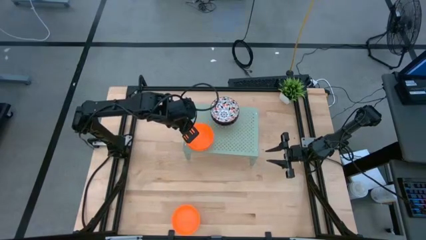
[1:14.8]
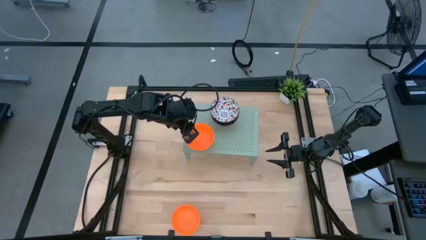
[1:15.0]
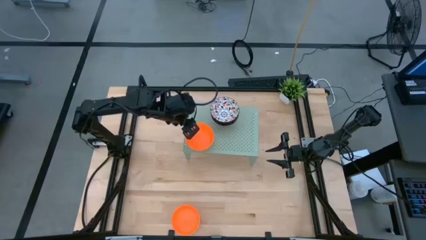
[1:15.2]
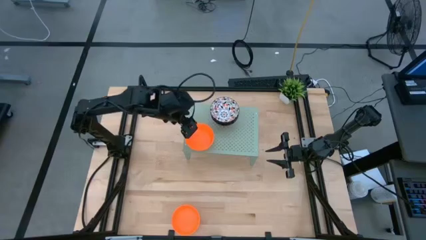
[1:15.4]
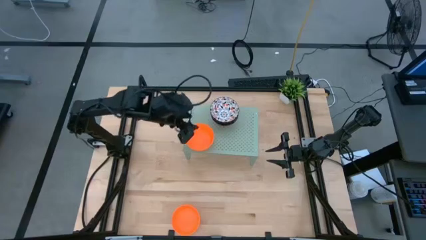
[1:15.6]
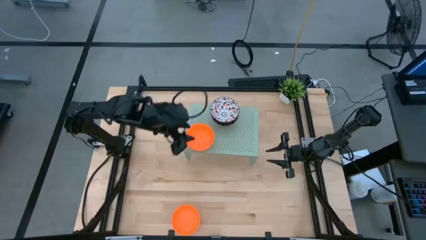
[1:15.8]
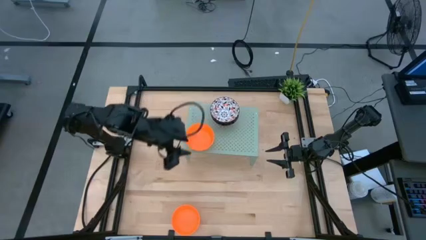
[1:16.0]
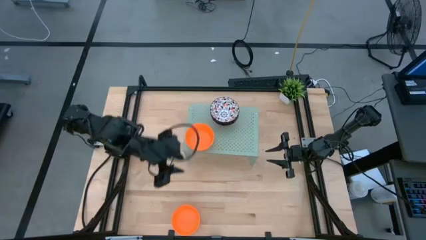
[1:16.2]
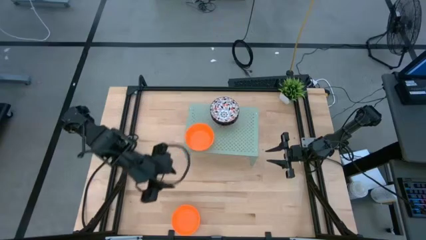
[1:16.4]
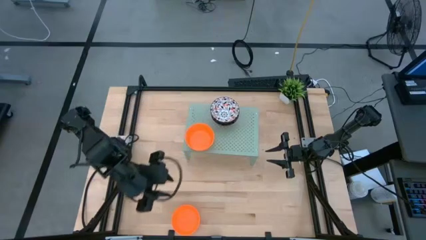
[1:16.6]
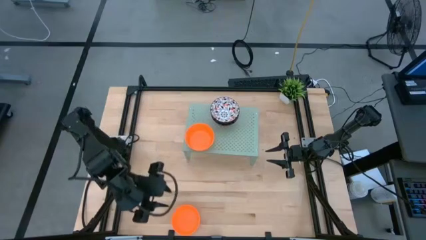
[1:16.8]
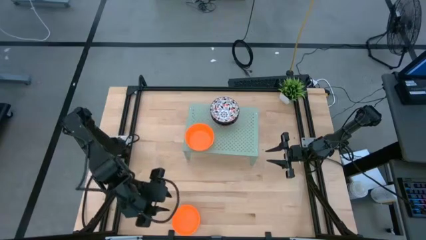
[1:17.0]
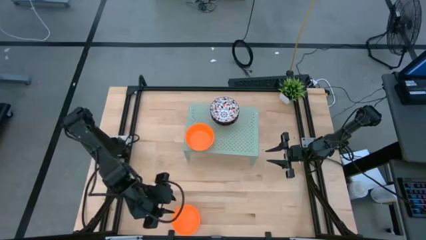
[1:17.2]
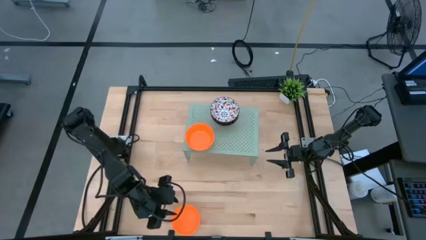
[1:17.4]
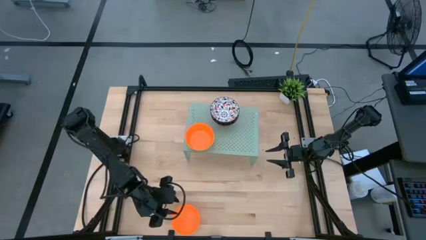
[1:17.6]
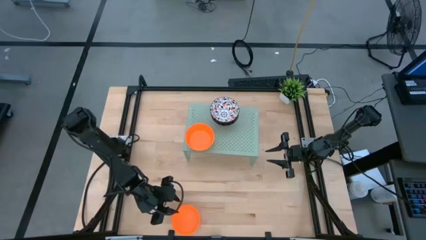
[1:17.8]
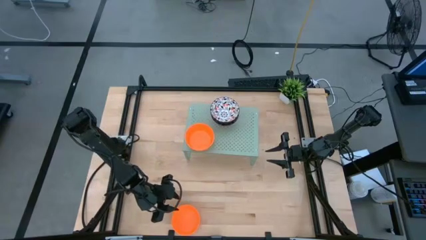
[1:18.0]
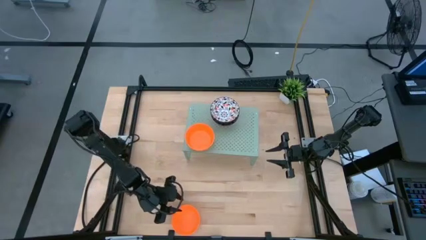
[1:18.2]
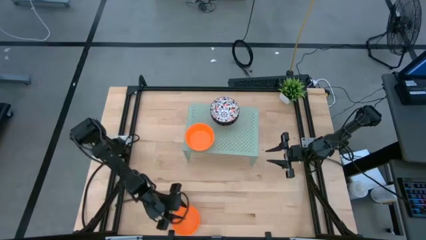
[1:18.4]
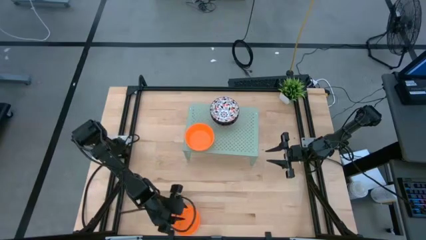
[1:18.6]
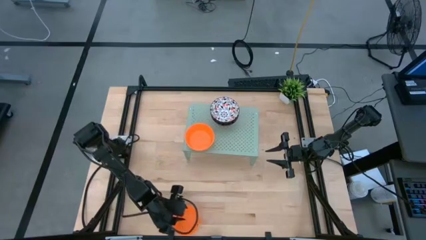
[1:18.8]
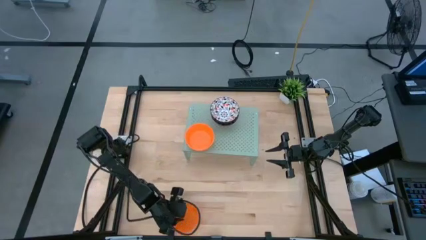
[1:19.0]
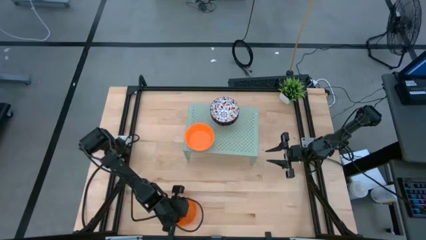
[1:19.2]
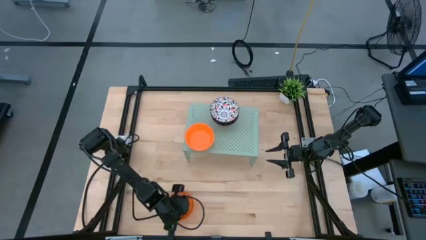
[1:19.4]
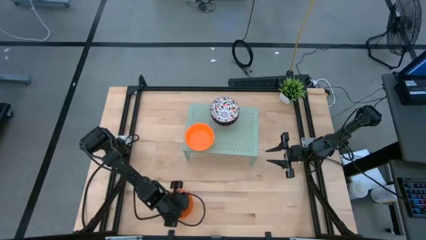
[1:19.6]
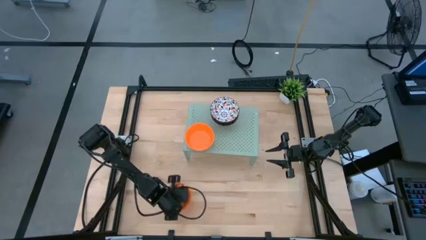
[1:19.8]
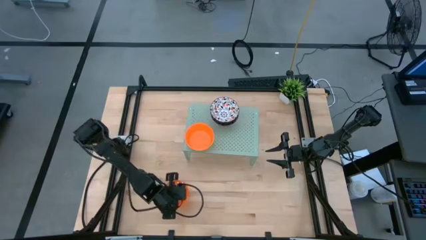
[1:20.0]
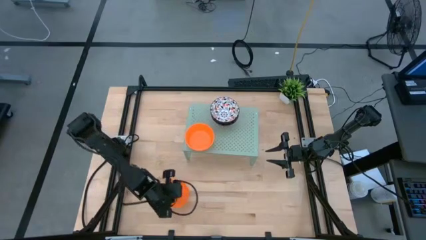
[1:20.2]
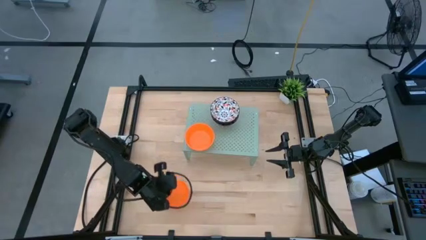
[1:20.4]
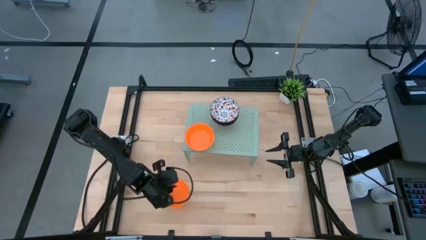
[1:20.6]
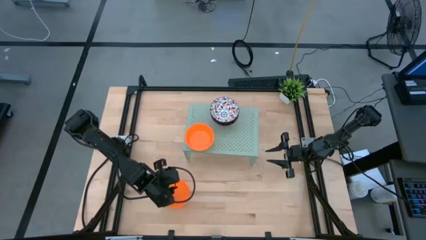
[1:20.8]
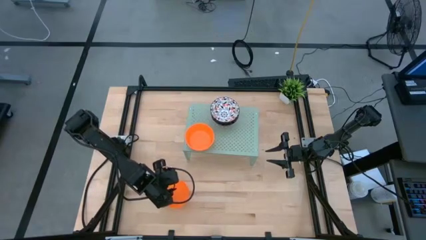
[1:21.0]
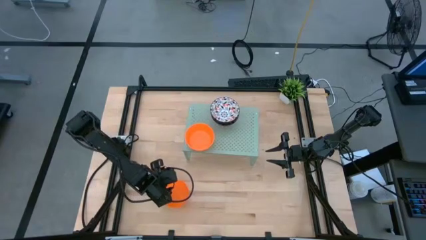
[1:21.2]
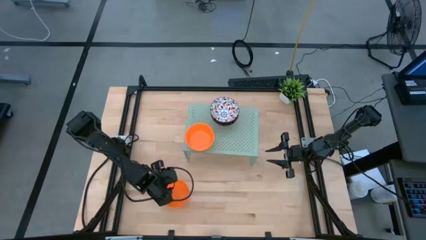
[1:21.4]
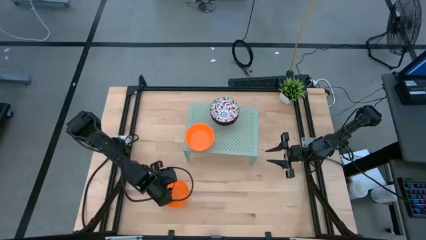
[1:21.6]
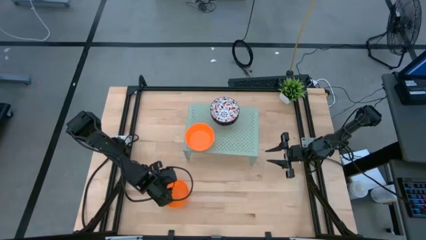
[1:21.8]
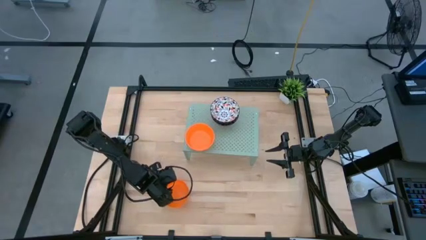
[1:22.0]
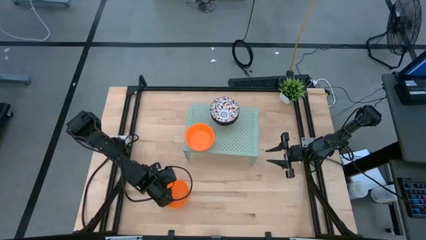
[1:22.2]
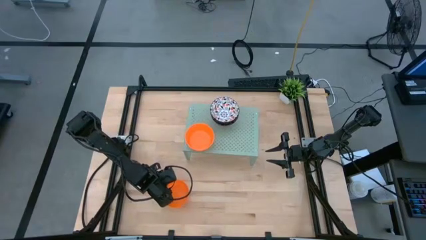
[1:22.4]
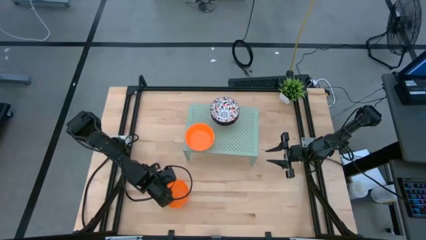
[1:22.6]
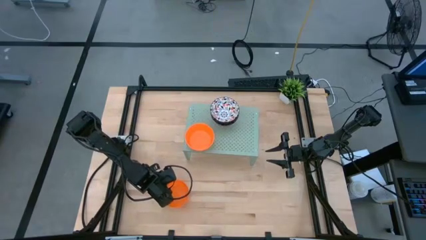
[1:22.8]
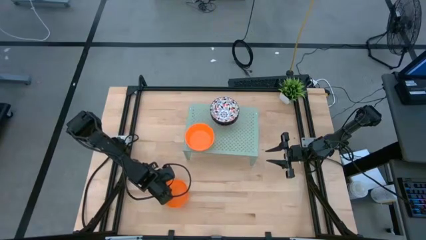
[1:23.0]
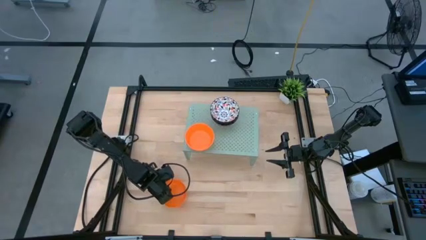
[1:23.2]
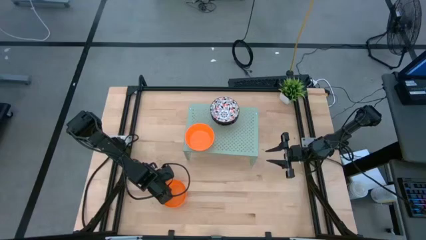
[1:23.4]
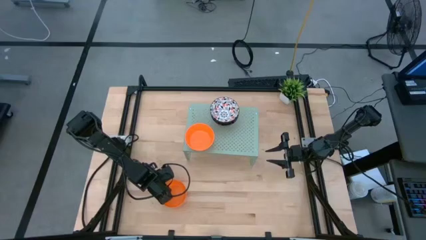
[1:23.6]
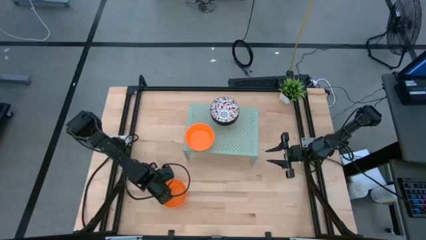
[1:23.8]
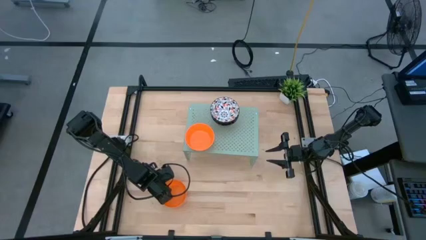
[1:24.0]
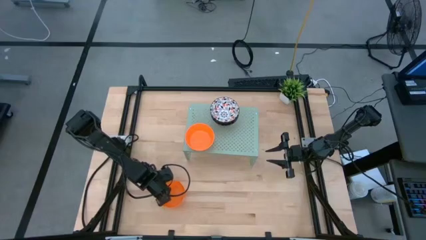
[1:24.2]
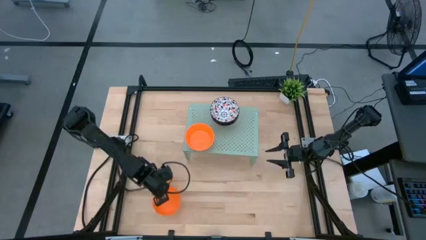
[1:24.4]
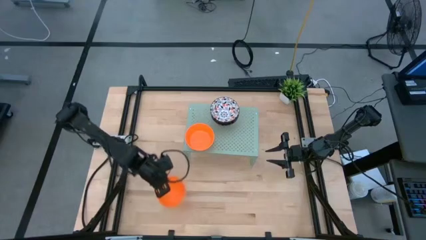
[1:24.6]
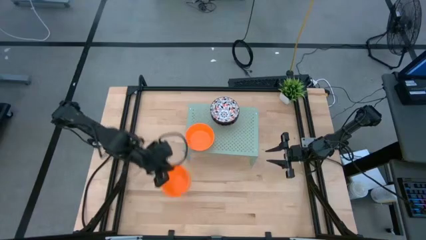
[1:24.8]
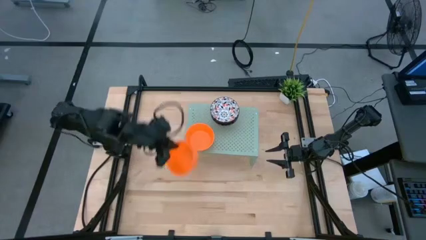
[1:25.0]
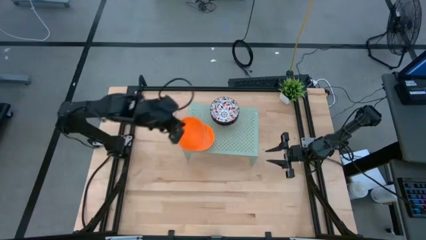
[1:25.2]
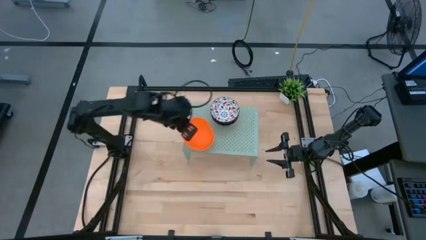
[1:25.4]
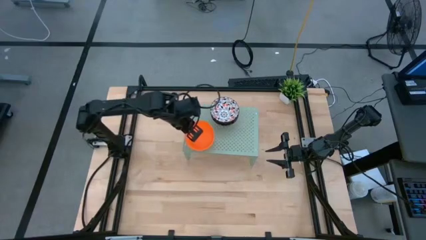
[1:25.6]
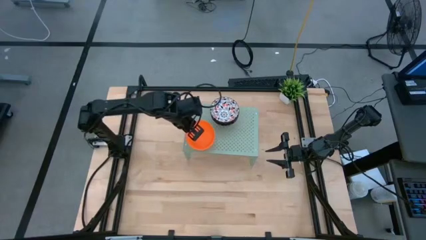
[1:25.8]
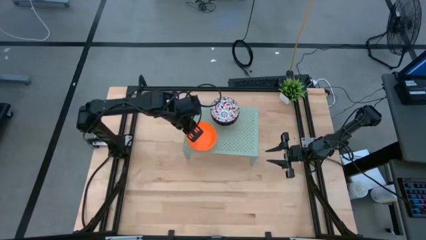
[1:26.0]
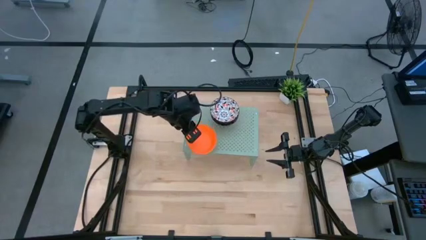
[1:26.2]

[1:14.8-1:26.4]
Task: Pick & Place Mini bowls
Stack the orange bowl on top of the orange bowls on the shelf
